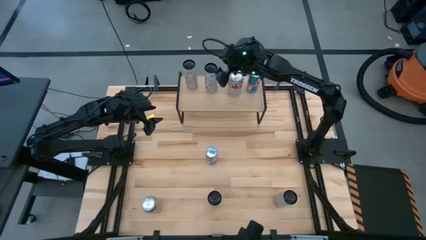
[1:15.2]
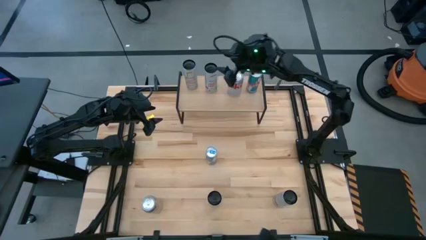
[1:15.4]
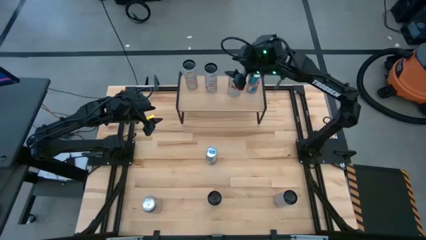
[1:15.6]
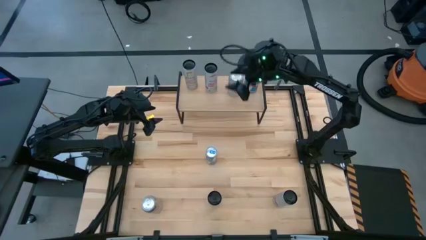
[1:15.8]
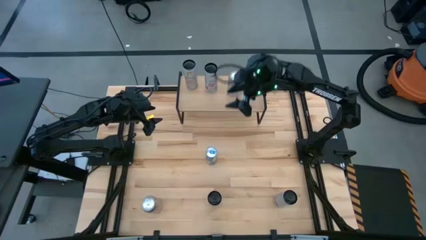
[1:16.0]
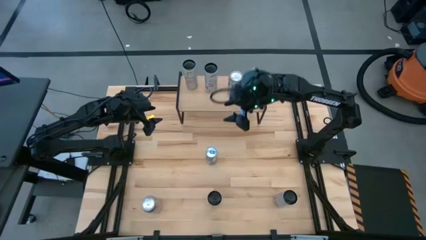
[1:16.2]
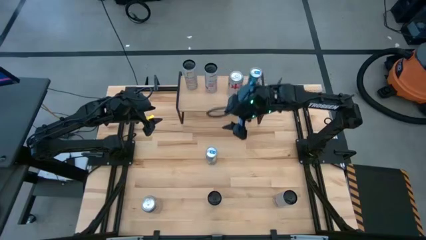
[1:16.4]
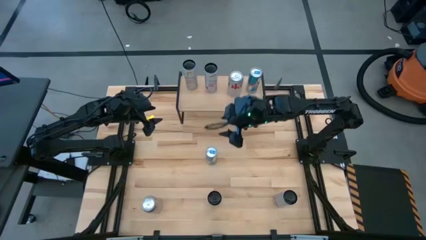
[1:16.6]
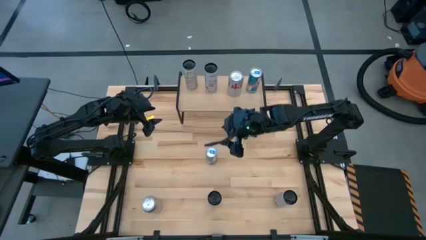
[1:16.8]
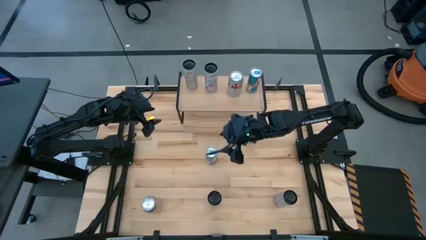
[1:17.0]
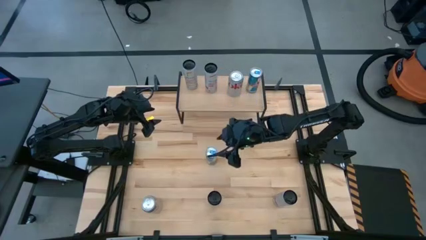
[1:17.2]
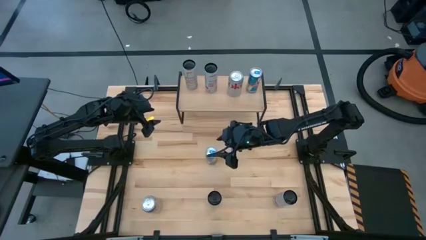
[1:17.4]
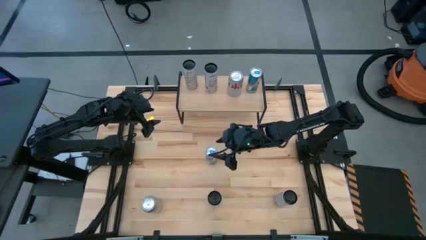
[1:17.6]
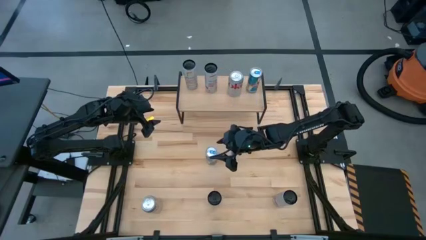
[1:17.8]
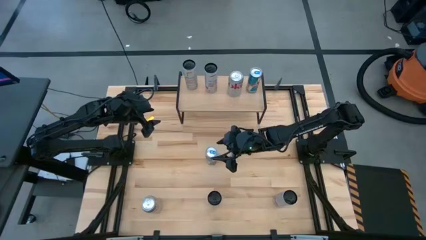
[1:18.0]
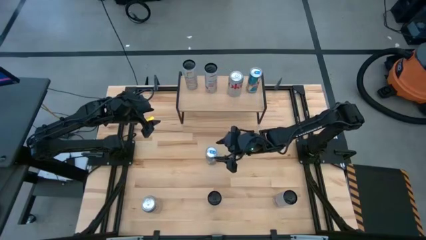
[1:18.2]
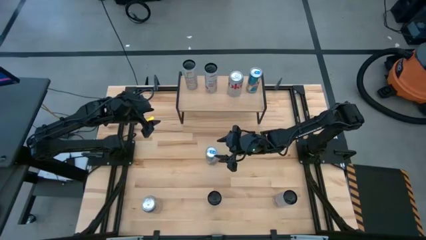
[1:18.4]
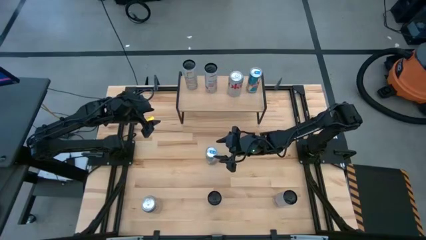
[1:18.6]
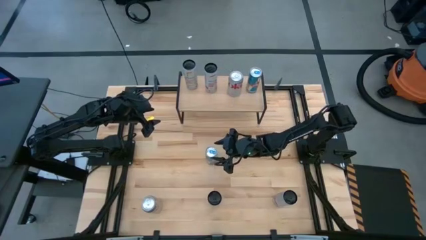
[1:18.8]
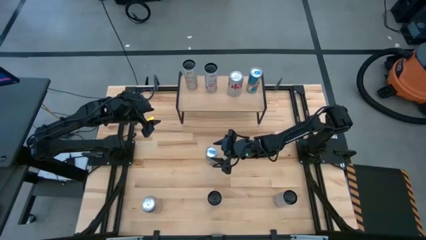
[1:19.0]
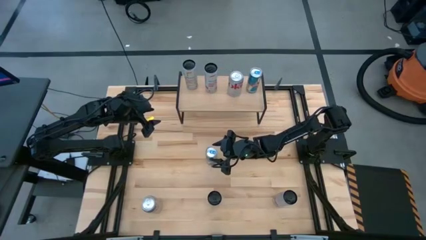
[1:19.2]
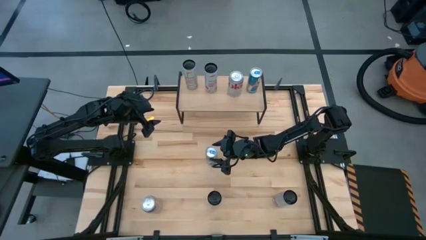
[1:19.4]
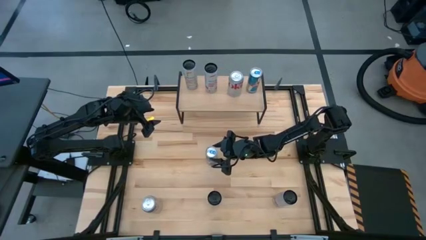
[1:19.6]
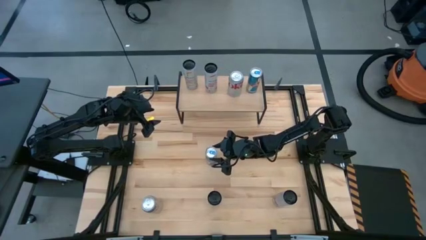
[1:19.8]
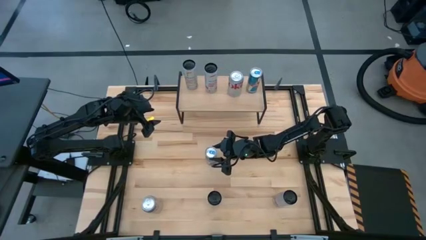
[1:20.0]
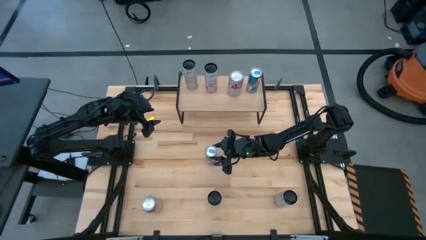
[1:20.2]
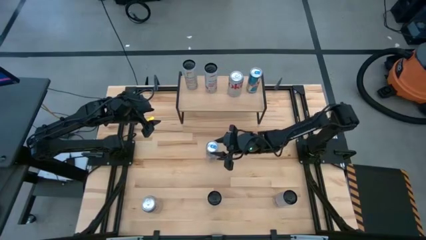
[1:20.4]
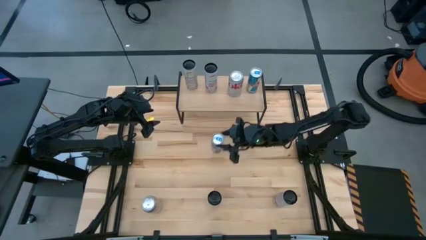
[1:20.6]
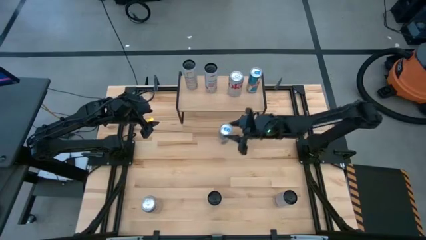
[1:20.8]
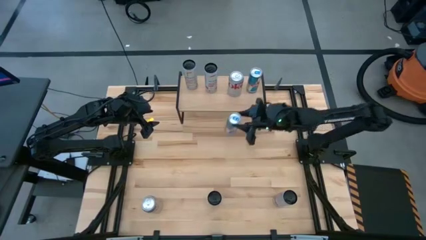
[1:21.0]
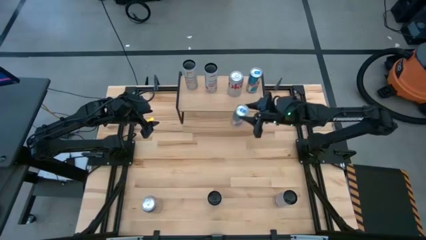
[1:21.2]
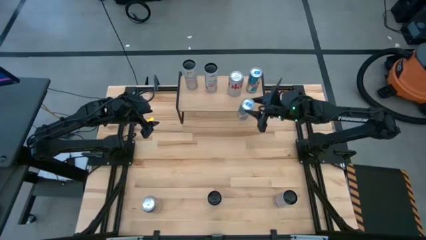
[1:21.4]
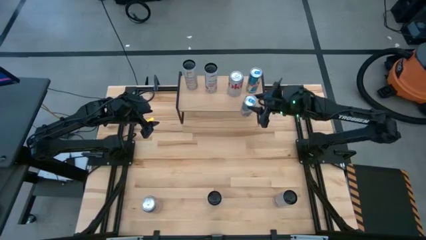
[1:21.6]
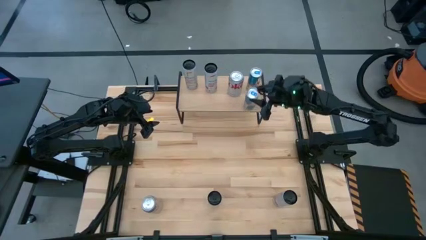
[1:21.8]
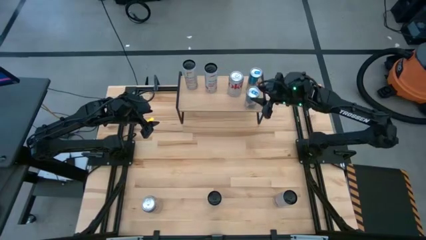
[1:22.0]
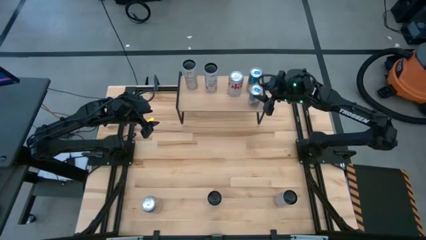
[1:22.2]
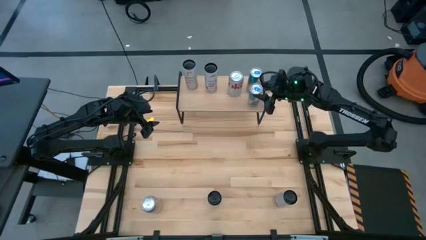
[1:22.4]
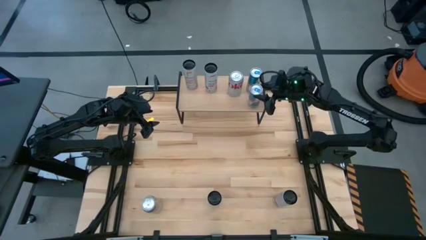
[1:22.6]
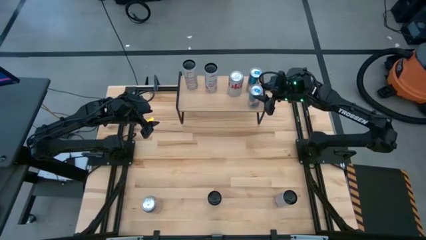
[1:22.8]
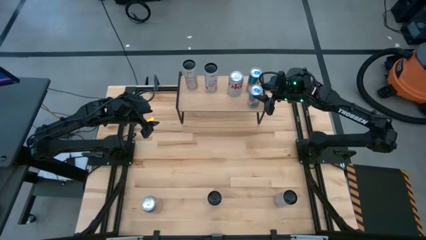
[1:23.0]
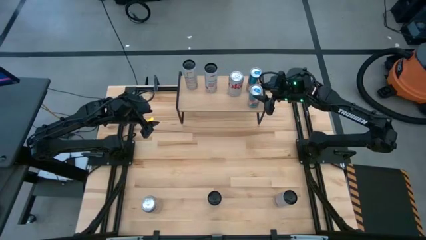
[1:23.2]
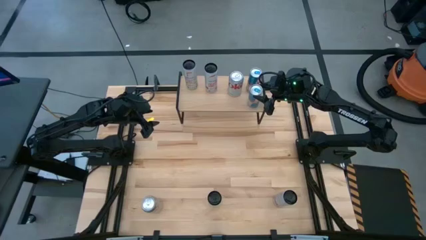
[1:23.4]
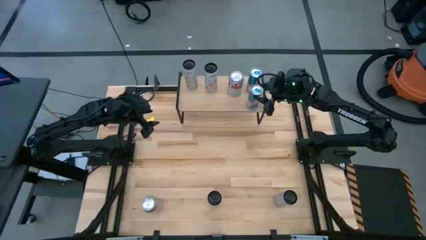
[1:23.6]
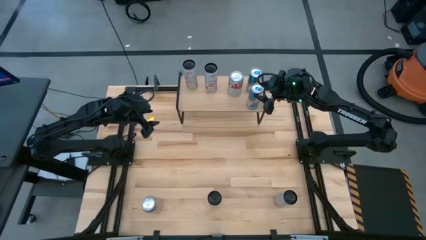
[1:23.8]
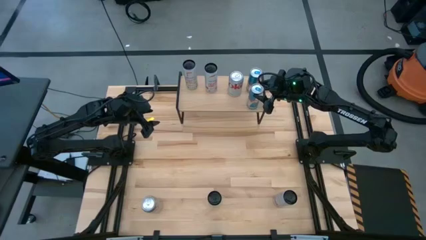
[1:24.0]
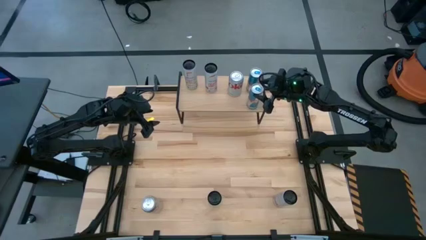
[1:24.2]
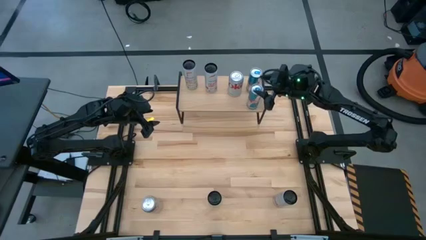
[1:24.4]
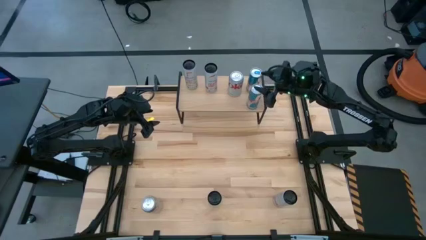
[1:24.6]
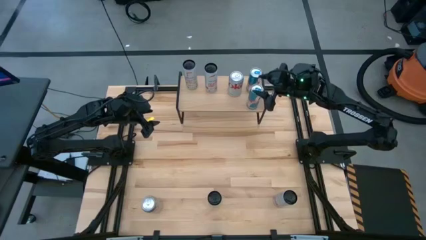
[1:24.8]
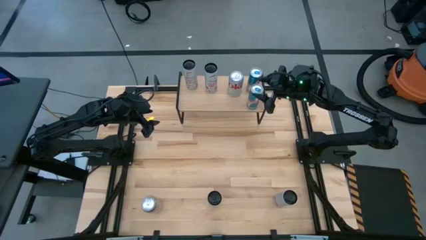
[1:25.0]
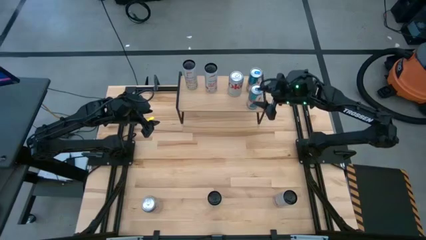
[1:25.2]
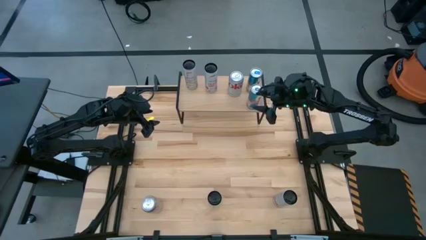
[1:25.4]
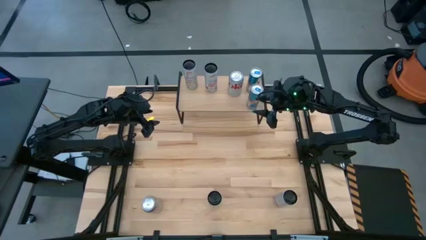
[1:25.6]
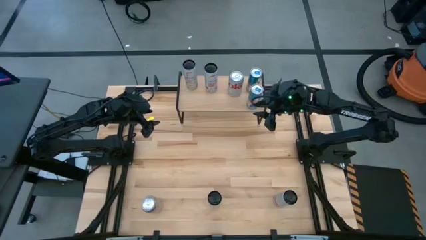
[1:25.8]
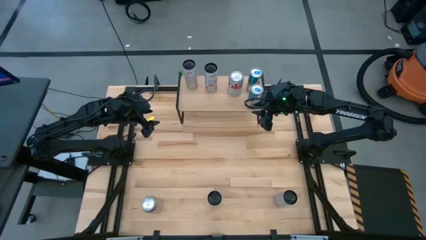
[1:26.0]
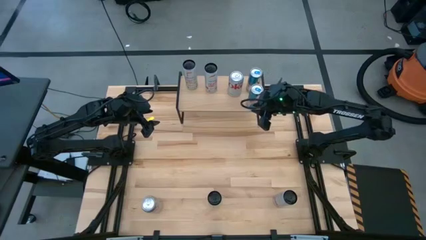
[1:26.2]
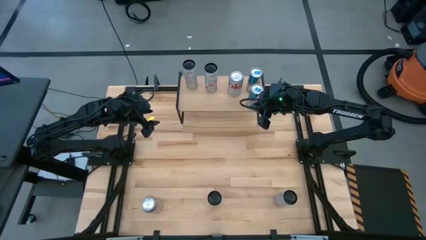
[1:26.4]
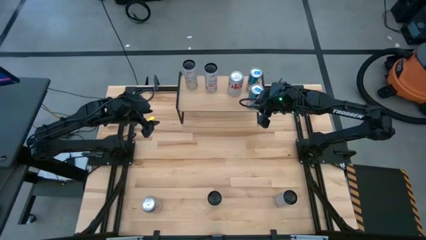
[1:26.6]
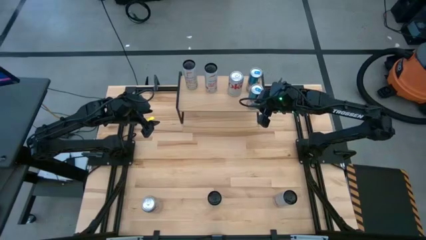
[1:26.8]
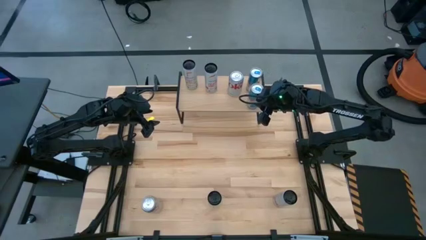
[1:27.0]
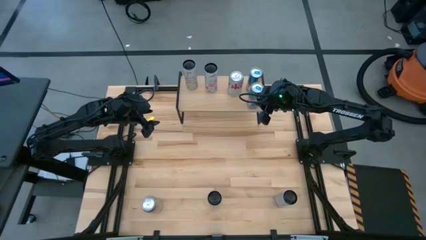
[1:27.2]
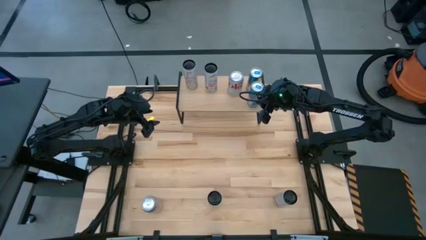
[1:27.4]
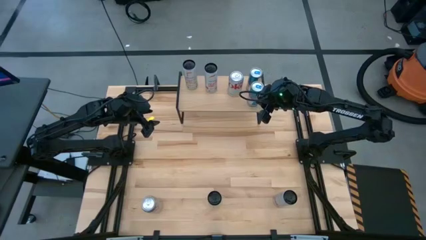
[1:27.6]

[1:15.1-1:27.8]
Task: Place canned beverage on shelf
Put the blue soda can aligned with the other blue soda can on the shelf
